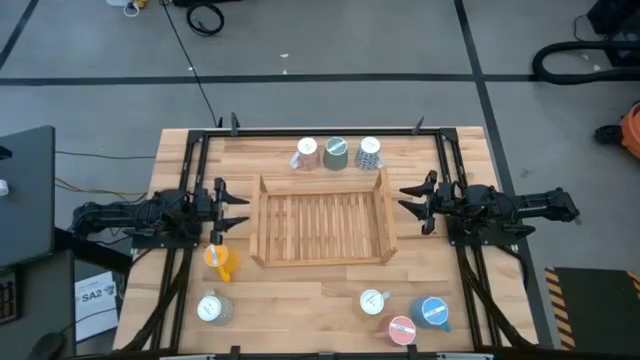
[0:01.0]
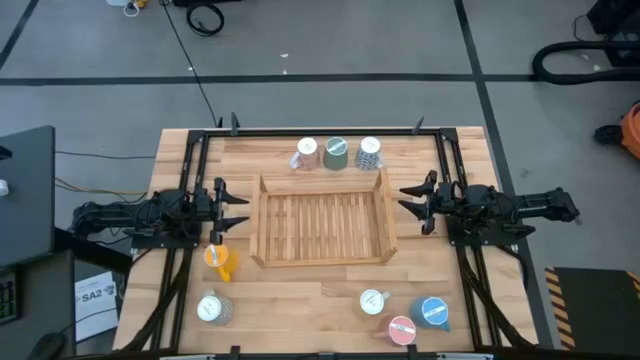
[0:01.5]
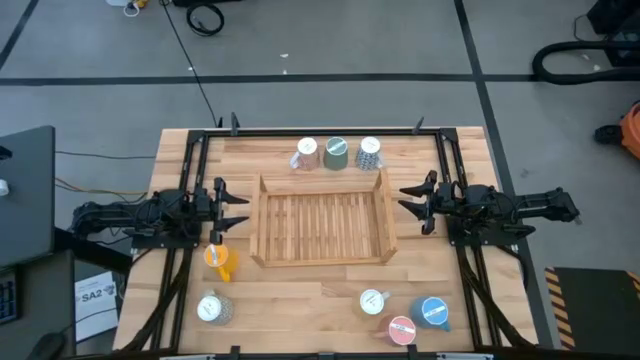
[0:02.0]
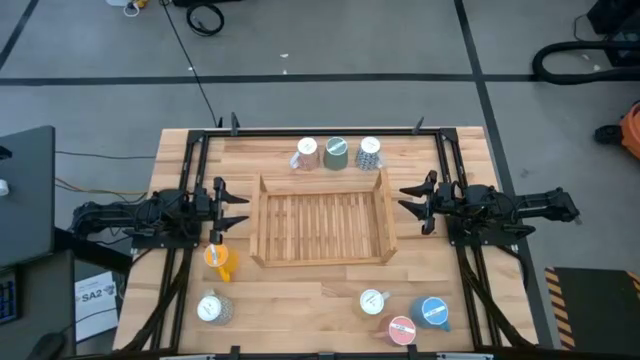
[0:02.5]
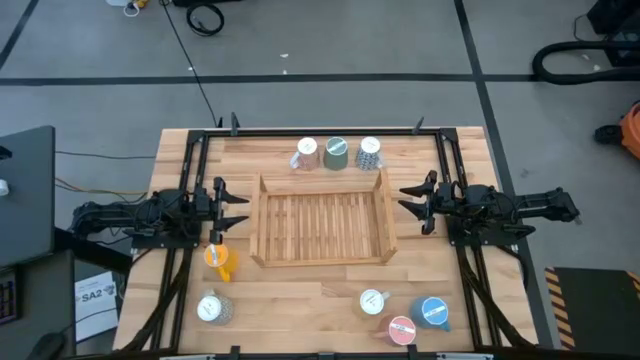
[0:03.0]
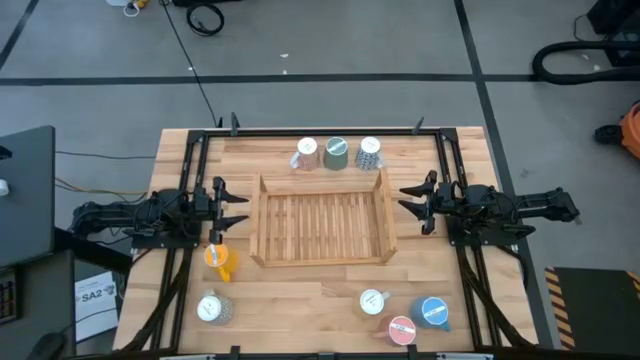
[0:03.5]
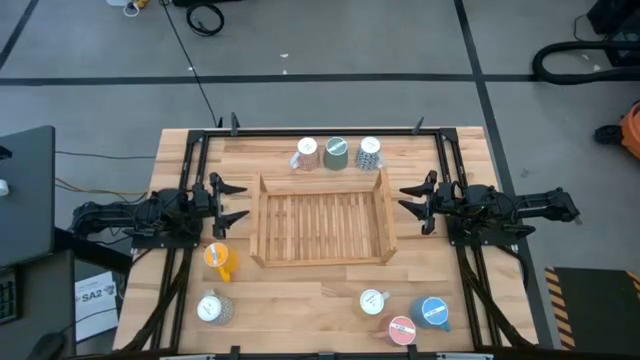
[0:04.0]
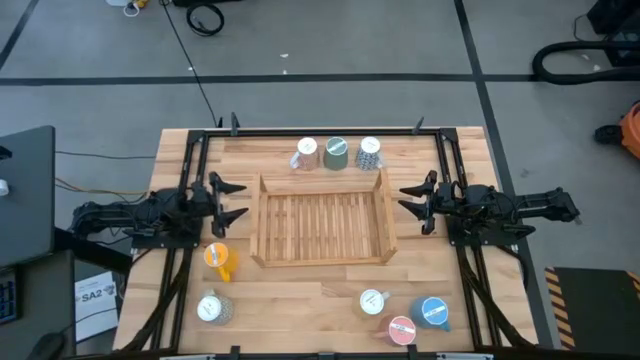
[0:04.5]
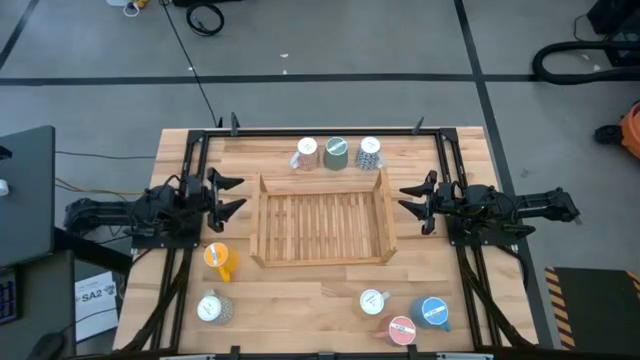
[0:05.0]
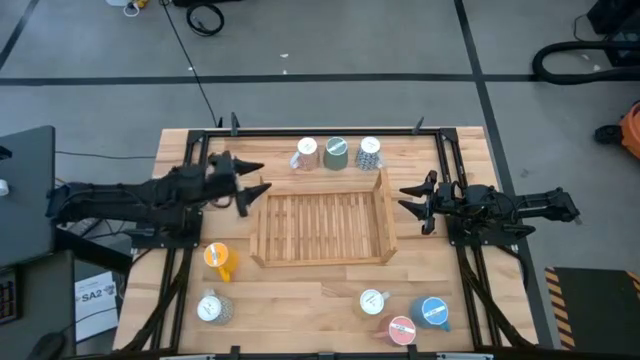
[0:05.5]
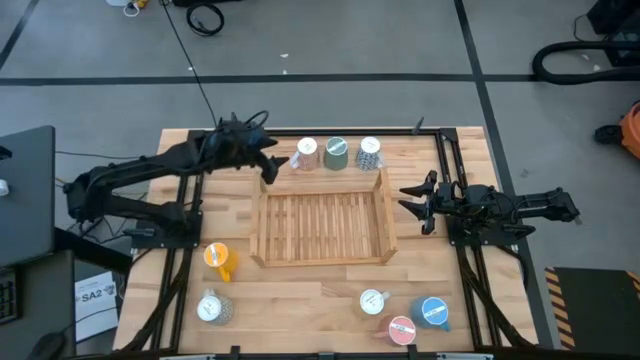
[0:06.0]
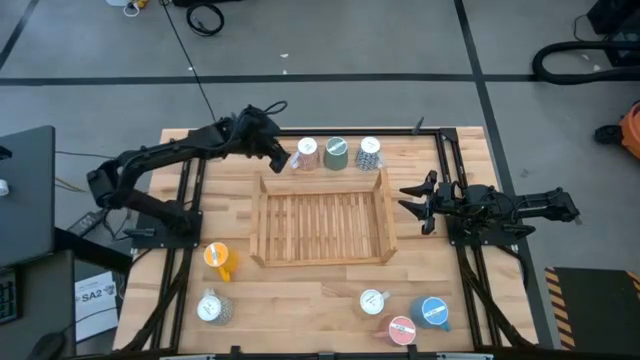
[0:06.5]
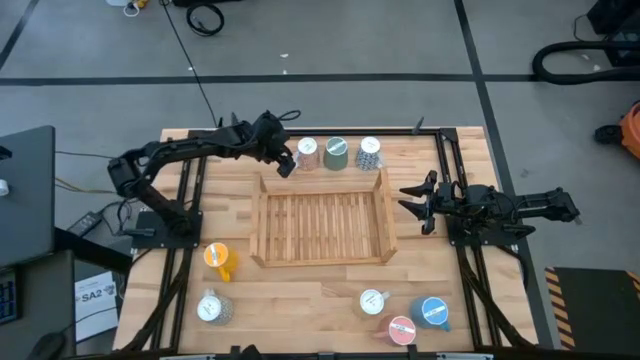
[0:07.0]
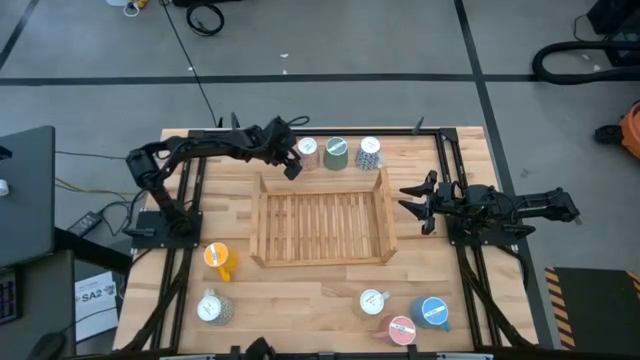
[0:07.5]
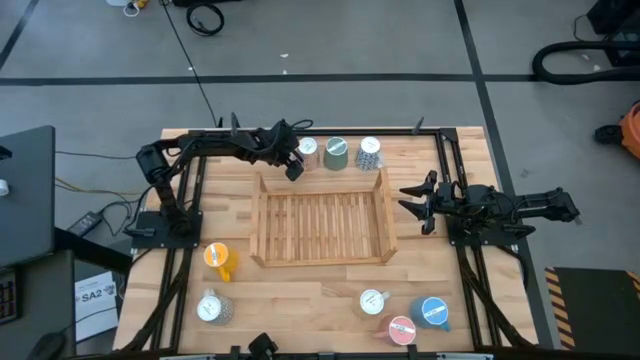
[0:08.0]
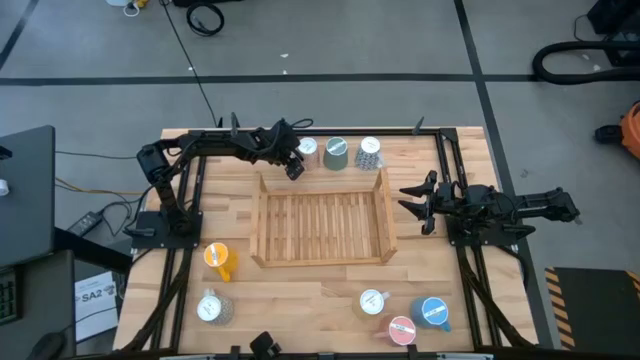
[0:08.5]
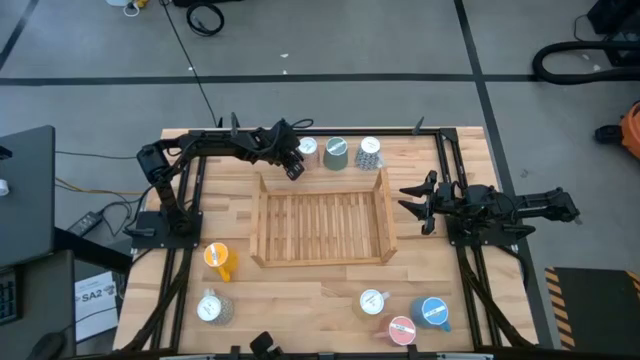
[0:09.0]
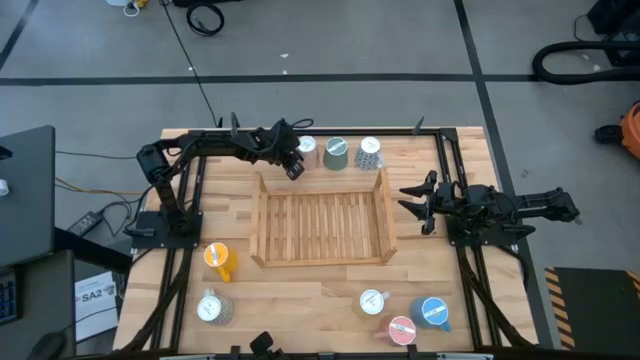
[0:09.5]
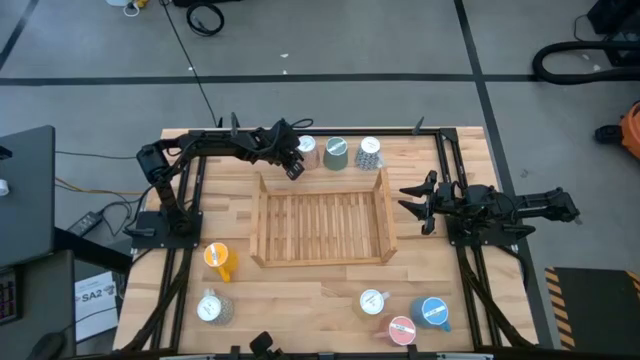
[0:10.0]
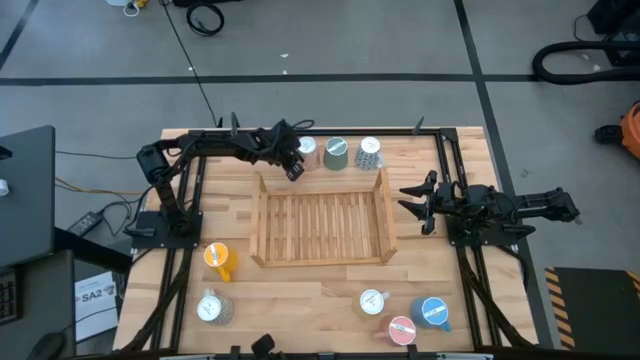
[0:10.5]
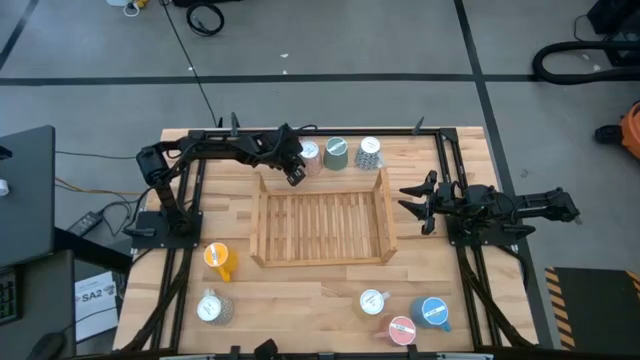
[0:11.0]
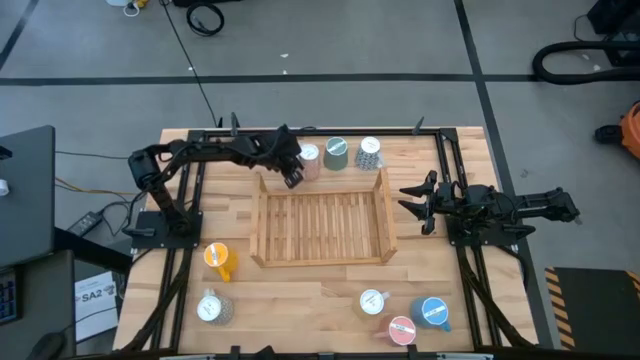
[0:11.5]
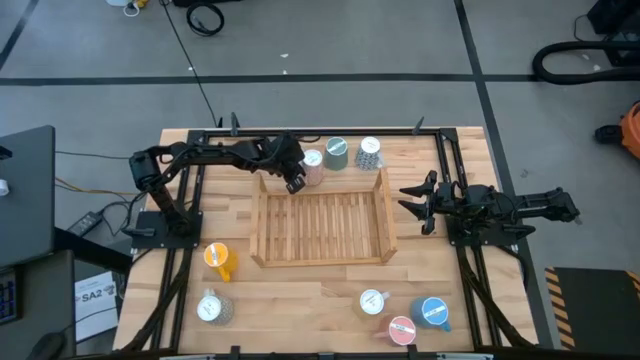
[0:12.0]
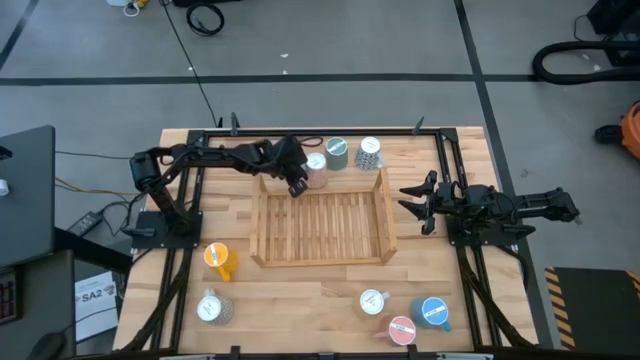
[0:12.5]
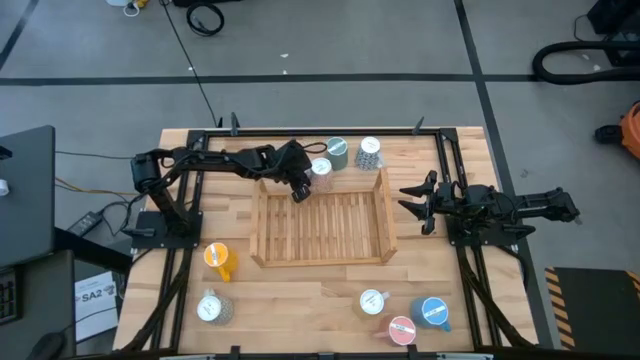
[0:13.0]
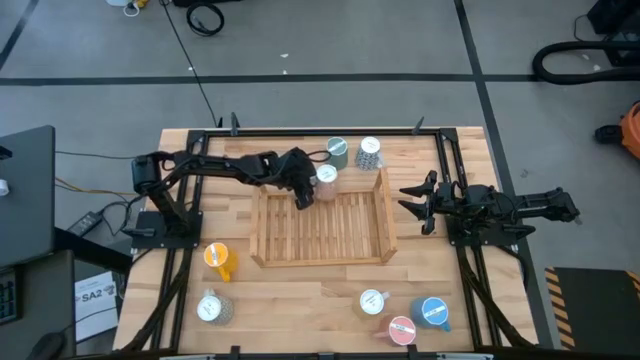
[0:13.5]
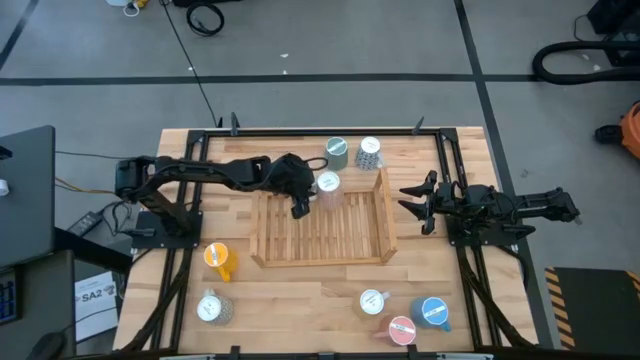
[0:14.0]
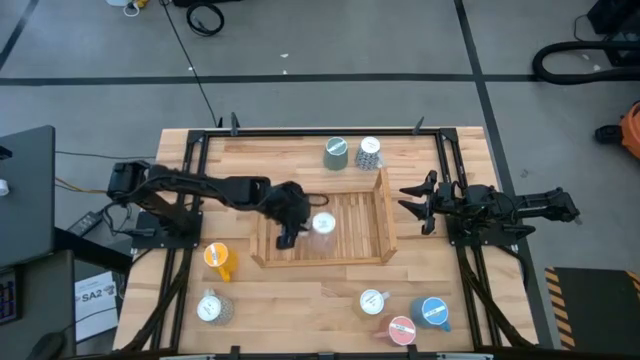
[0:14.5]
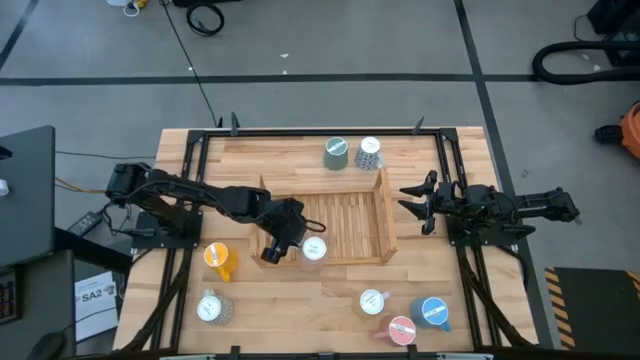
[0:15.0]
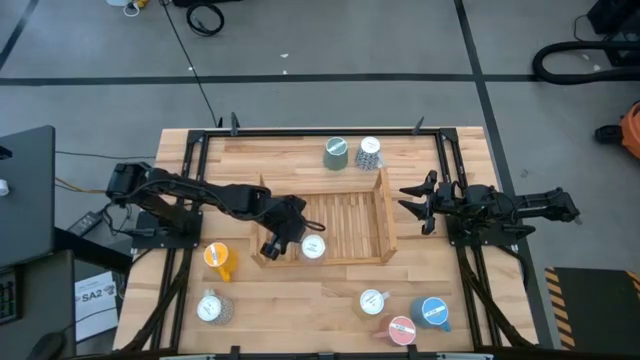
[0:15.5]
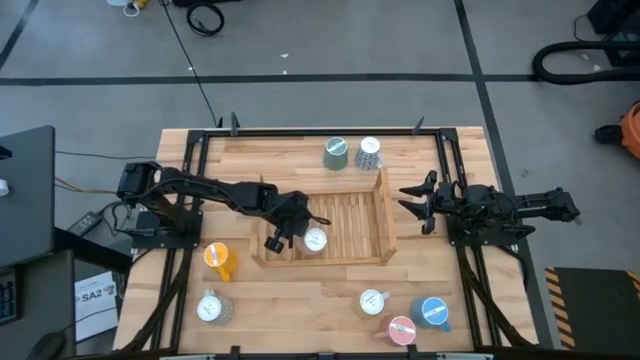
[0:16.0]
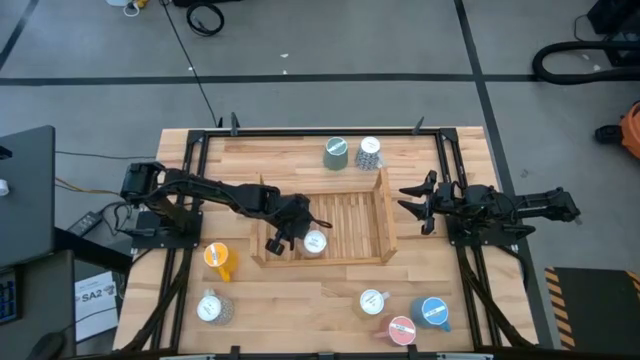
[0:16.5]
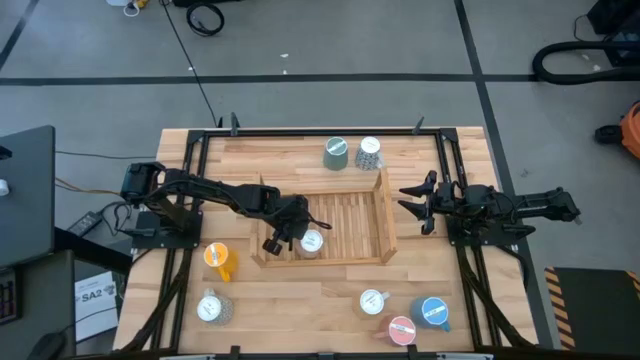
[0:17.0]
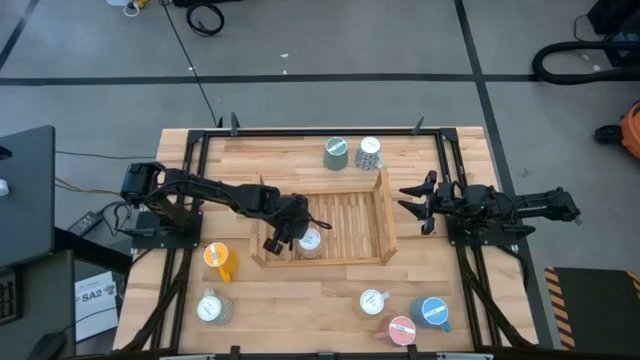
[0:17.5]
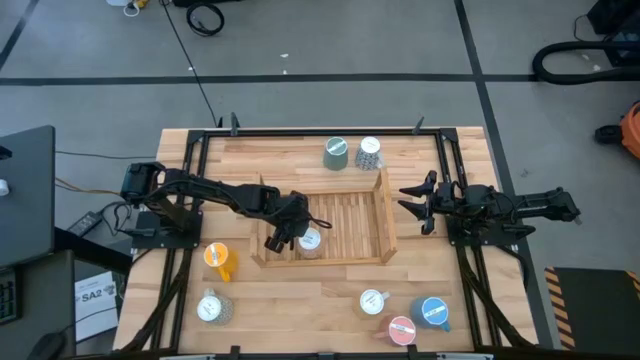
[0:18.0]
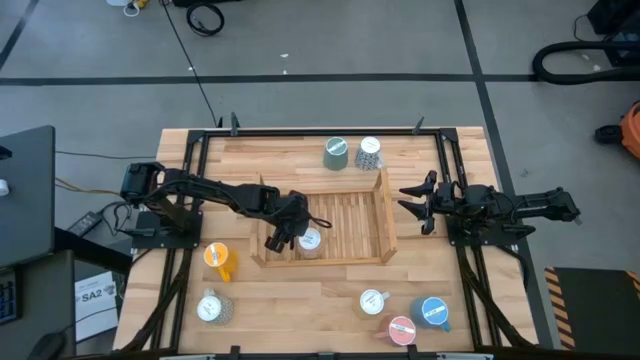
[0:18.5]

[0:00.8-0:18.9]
Task: Place coffee mugs
Put the orange patterned mug on the shelf
